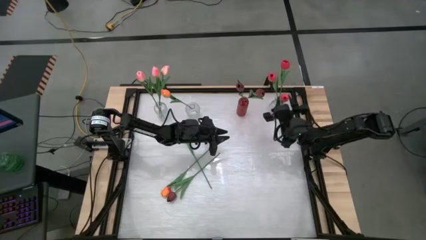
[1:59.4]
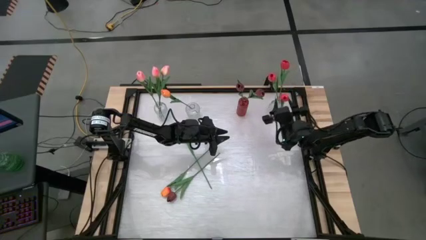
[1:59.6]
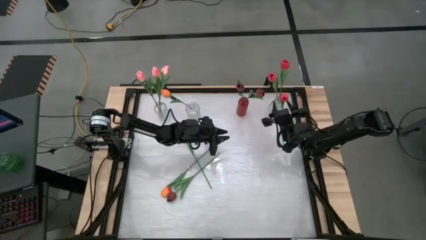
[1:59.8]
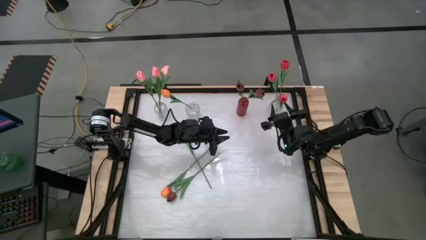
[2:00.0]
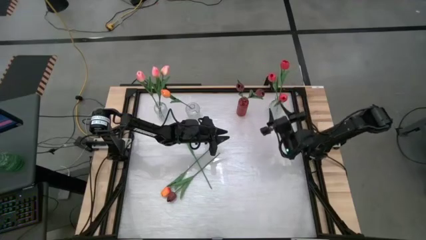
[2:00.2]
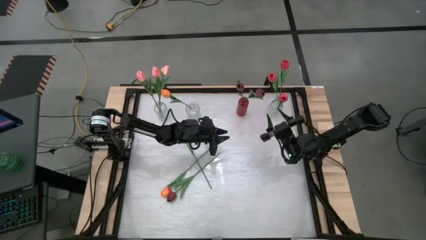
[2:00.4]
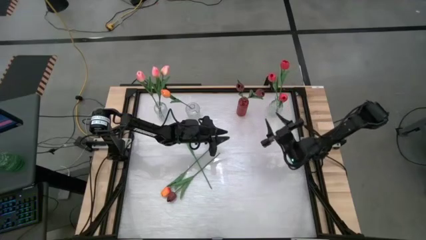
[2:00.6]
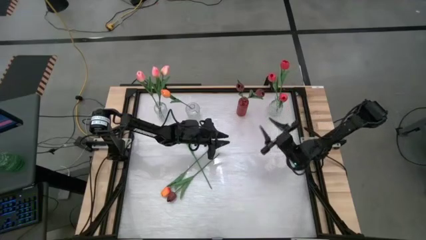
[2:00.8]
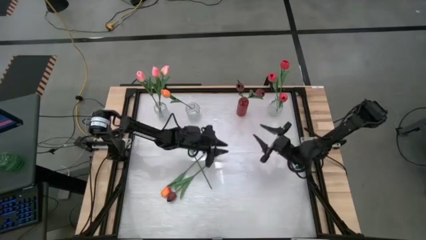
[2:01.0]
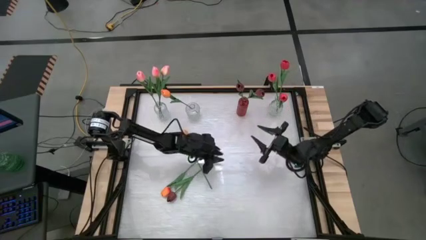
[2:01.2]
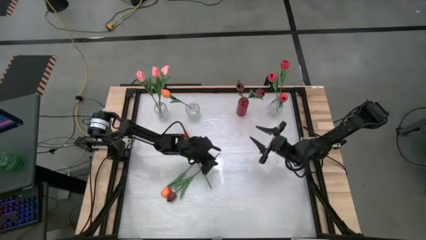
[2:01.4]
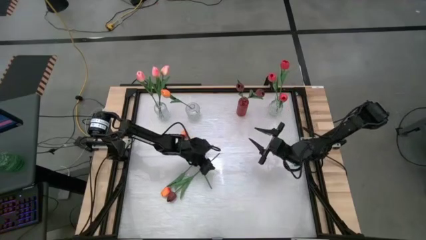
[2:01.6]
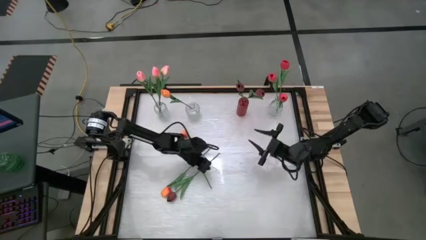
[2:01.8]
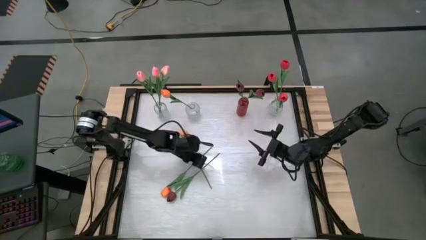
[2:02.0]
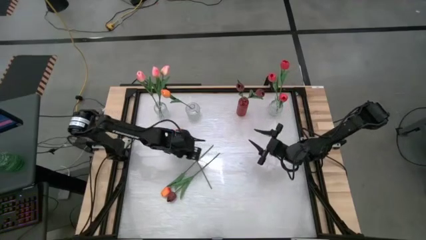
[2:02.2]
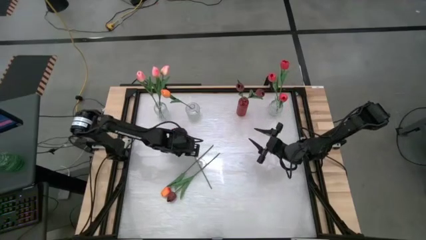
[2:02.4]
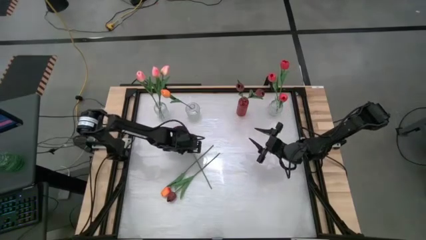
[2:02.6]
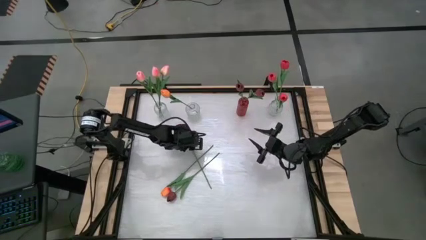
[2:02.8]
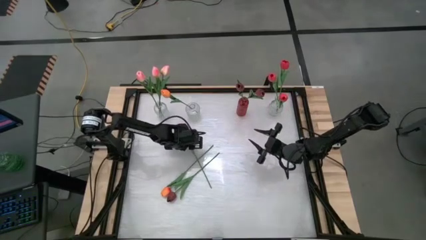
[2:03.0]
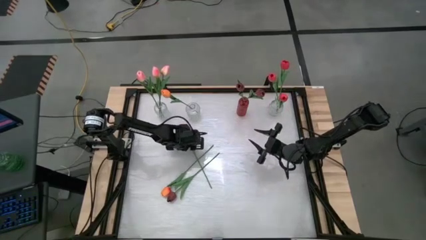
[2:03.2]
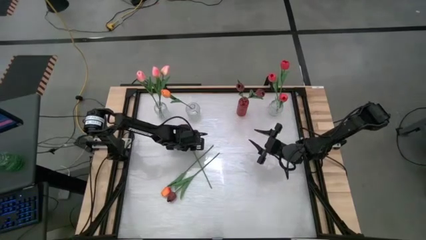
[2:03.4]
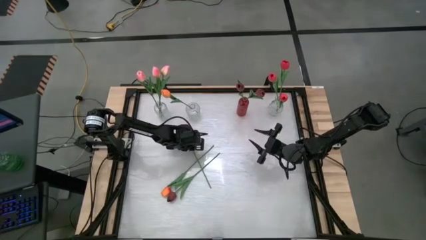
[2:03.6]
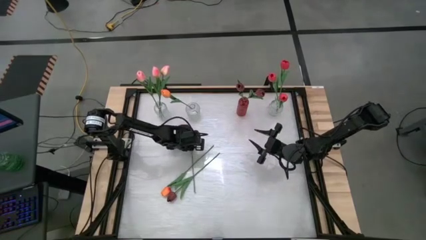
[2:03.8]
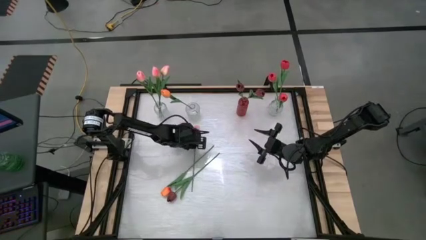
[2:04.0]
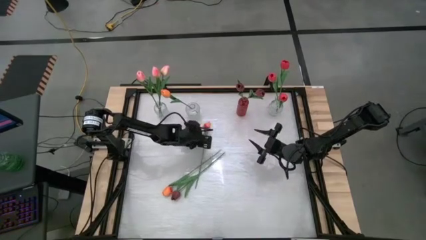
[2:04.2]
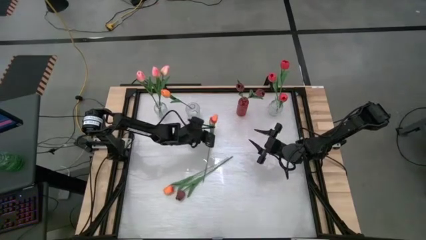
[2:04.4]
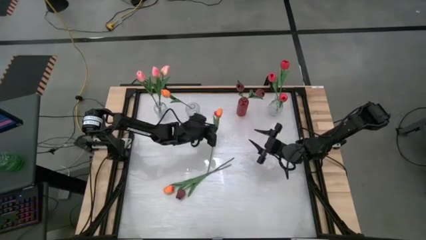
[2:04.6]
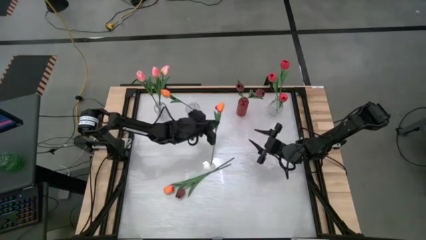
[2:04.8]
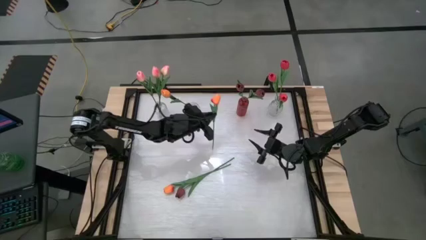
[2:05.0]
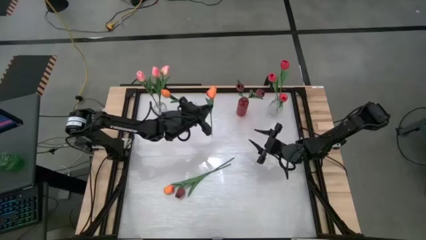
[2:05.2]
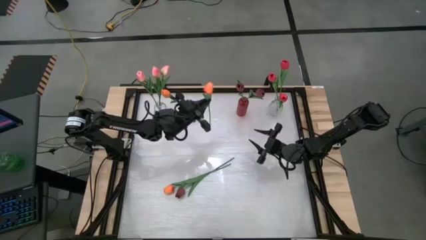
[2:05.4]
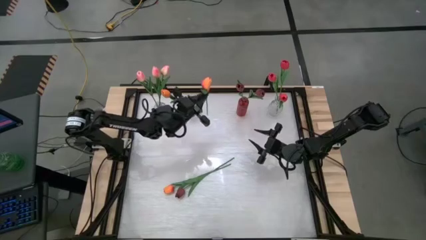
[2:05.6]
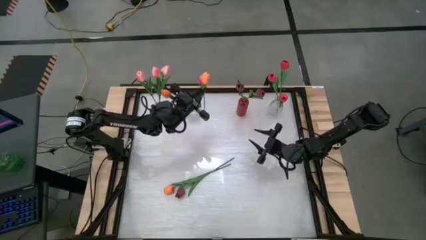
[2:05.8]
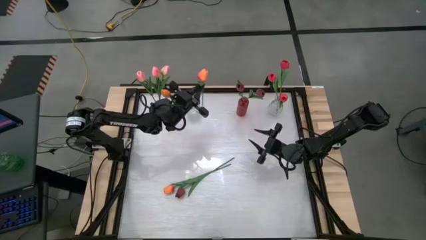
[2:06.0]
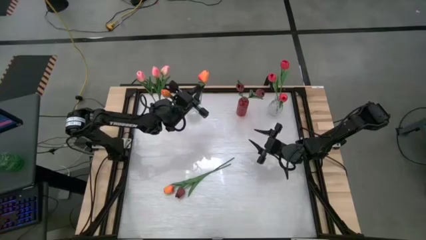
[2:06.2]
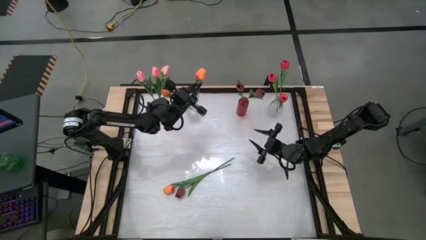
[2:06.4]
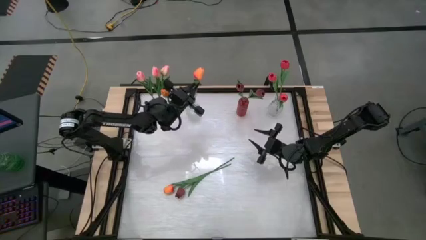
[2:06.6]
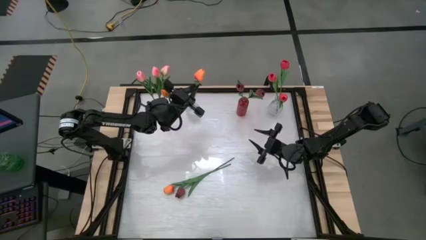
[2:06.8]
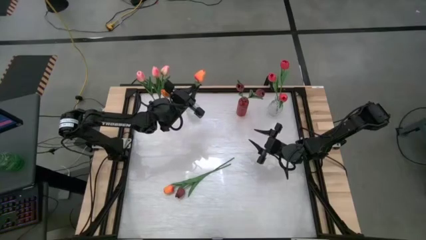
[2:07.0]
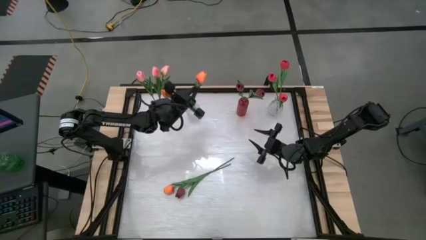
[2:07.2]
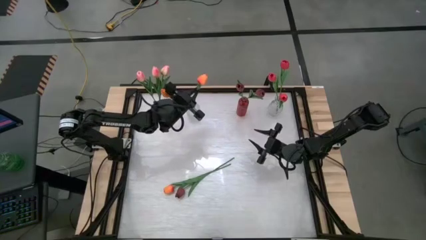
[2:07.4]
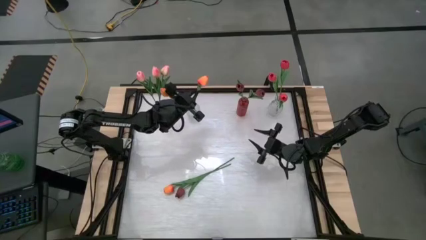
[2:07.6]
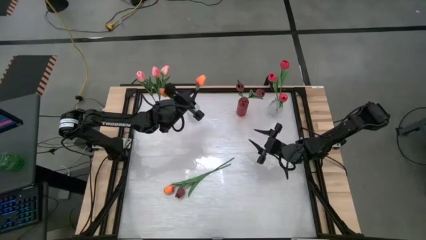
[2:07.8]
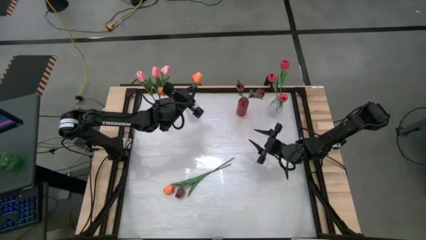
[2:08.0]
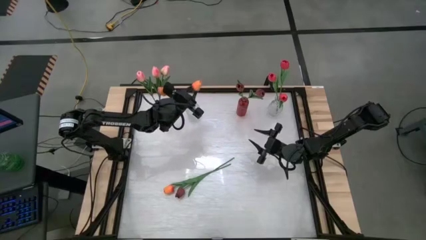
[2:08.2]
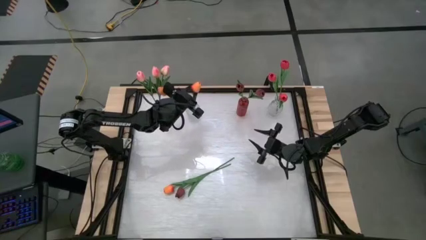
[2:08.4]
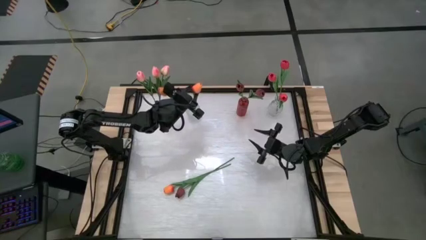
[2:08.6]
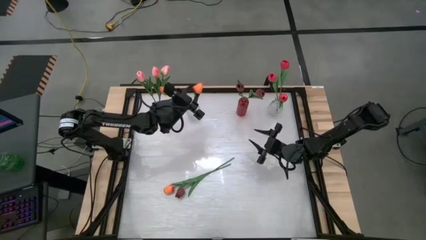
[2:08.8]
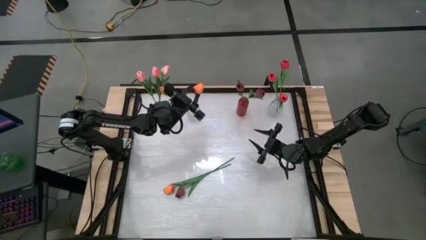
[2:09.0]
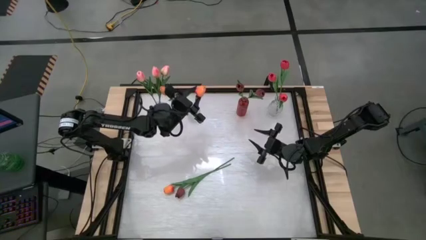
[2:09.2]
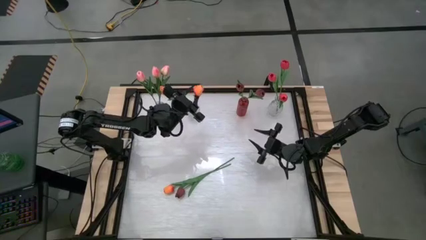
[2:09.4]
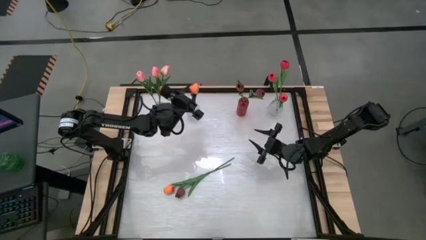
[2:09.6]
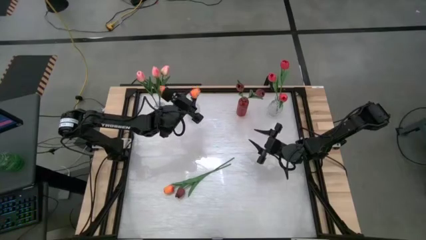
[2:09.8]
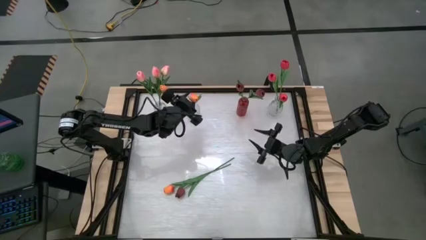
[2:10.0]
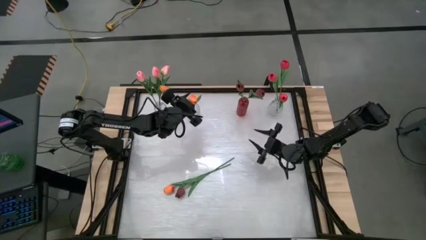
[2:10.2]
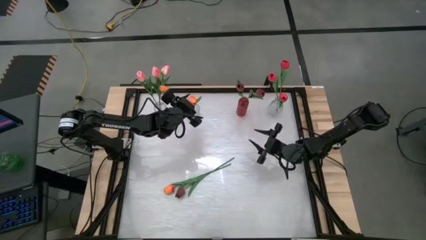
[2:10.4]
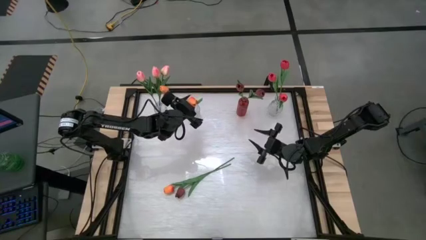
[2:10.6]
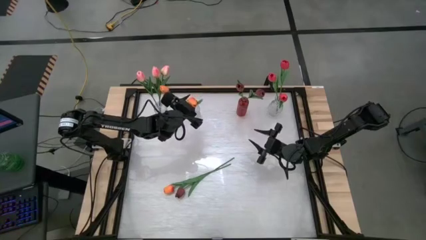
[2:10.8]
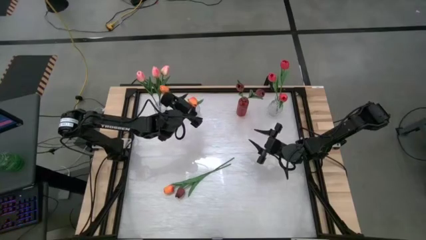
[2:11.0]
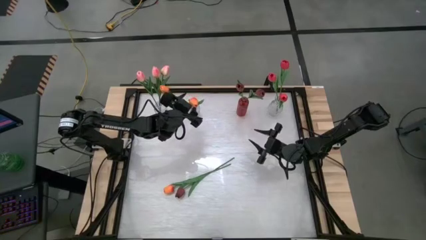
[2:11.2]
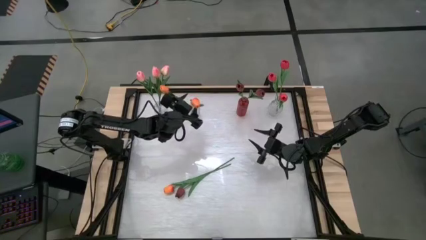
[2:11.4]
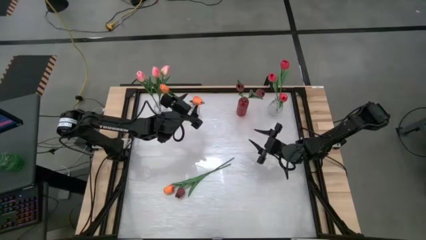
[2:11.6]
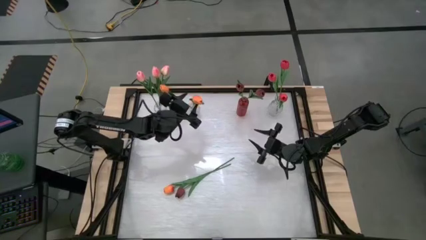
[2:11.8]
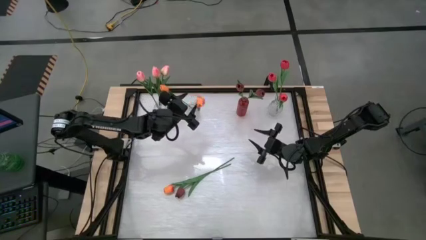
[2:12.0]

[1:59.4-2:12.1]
Task: Sort flowers into vase by color
Put the orange flower into the middle transparent vase

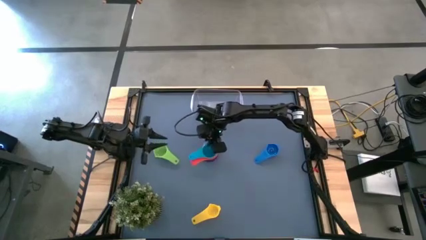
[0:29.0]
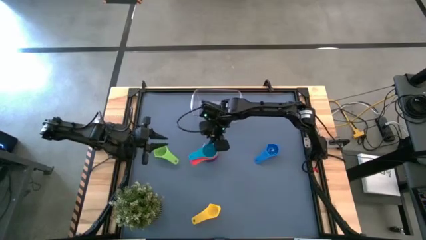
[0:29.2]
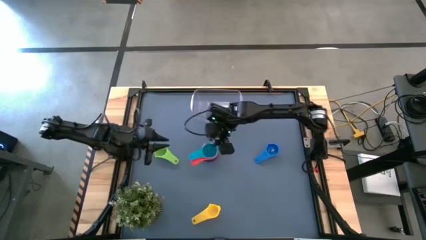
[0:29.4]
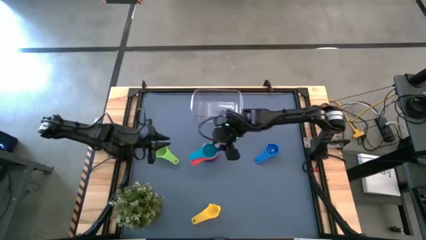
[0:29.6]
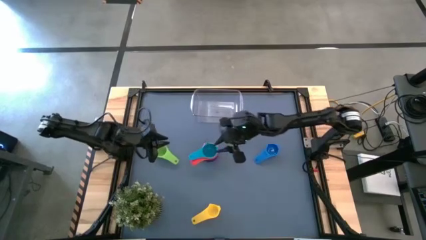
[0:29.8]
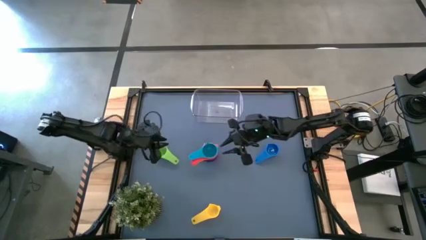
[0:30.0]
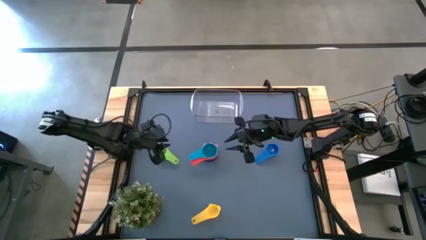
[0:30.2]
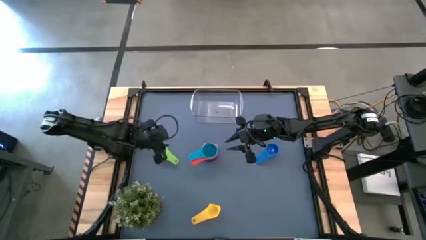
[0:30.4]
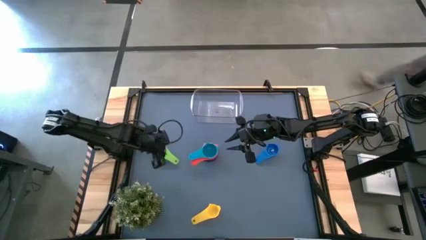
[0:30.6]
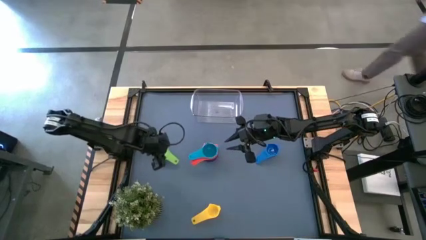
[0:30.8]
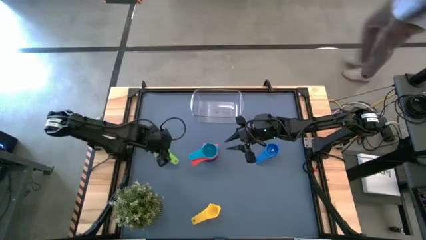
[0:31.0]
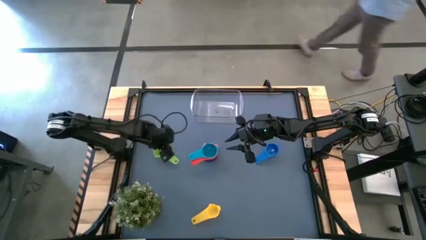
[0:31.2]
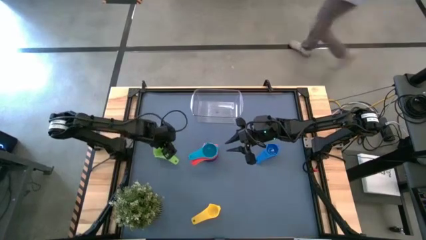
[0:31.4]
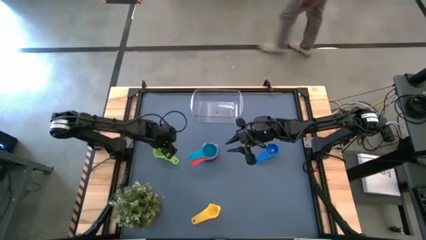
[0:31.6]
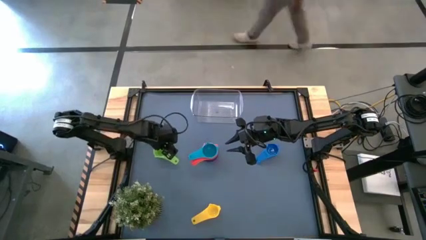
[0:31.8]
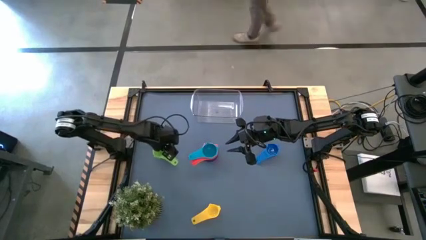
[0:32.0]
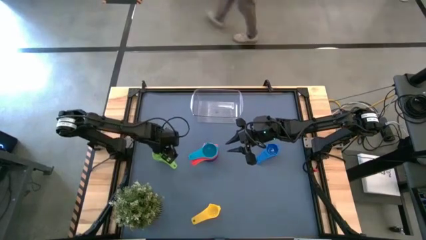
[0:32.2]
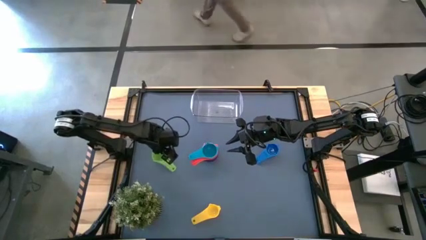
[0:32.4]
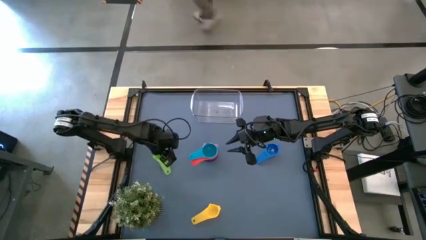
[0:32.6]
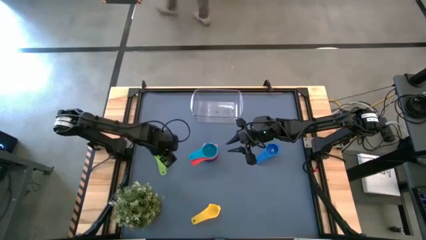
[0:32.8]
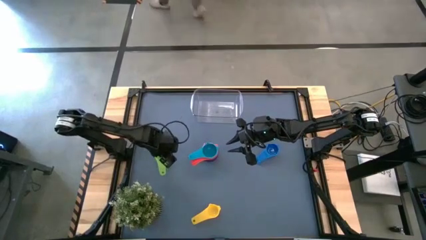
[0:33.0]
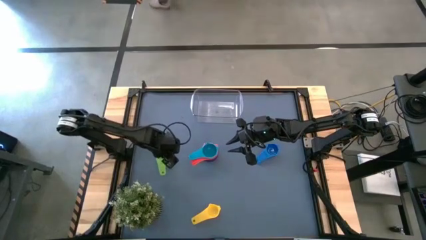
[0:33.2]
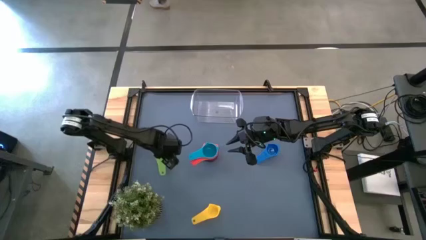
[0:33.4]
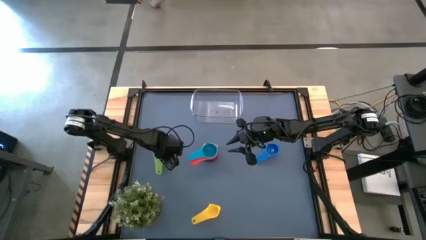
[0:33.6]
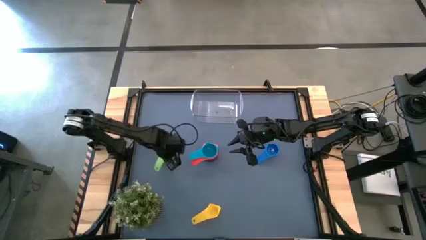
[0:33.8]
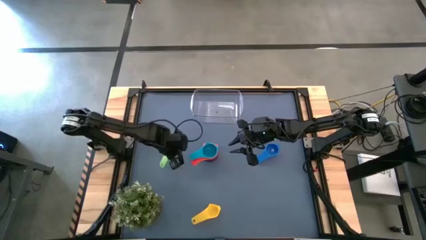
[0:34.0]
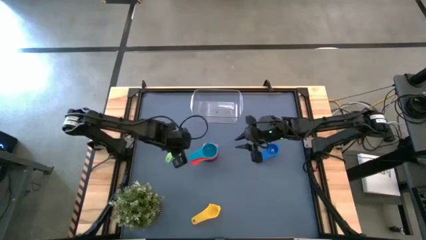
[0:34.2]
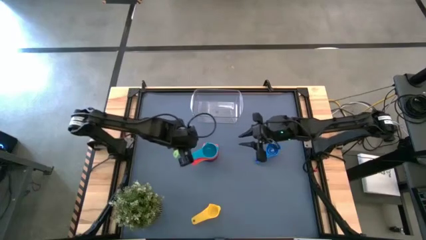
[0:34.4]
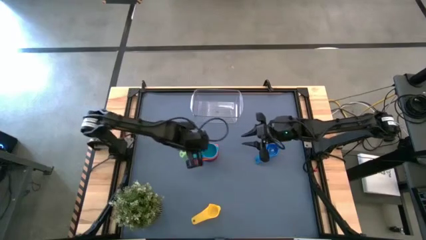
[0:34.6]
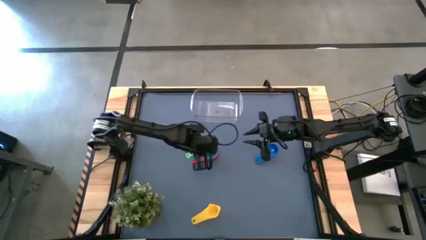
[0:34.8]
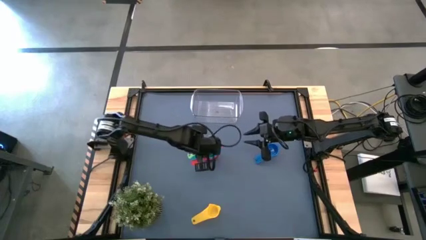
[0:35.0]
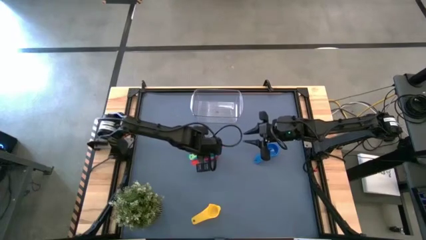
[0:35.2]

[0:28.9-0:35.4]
Task: Nest measuring cups in basket
Stack the green measuring cup on top of the light blue measuring cup
